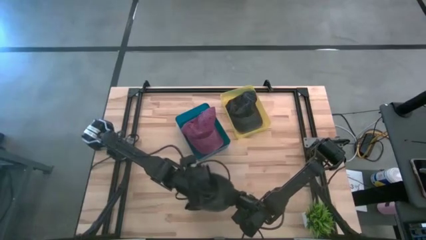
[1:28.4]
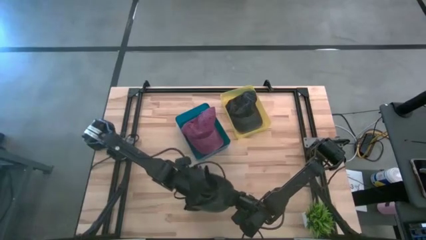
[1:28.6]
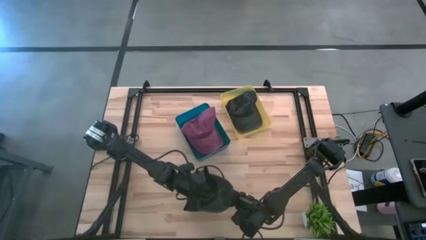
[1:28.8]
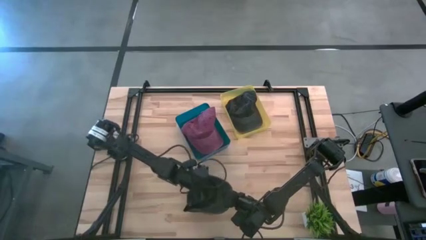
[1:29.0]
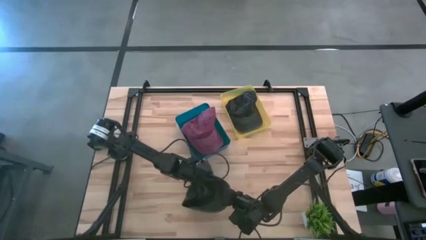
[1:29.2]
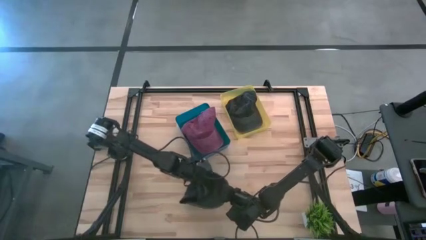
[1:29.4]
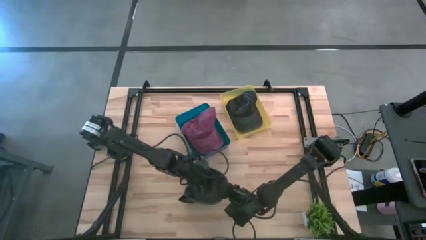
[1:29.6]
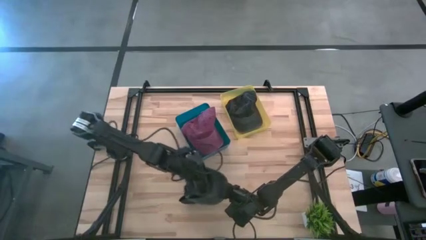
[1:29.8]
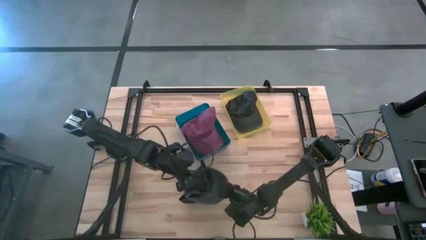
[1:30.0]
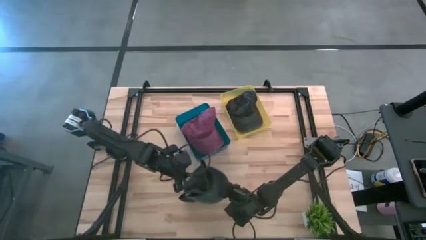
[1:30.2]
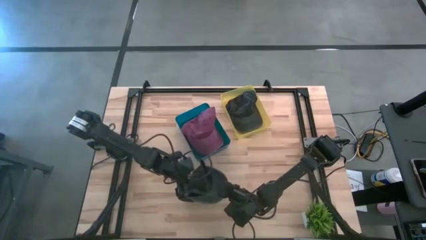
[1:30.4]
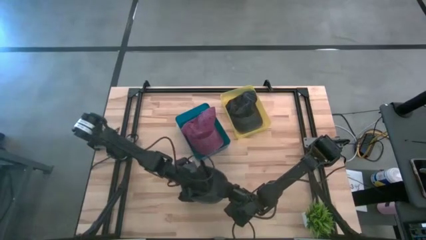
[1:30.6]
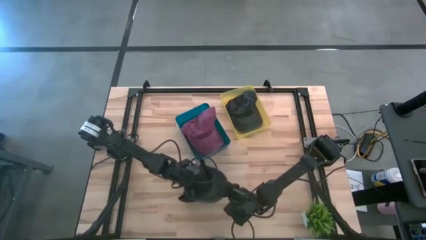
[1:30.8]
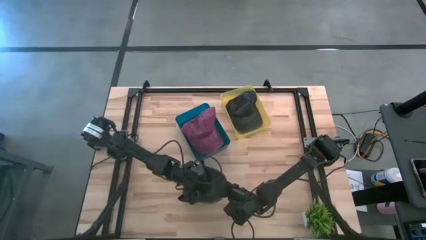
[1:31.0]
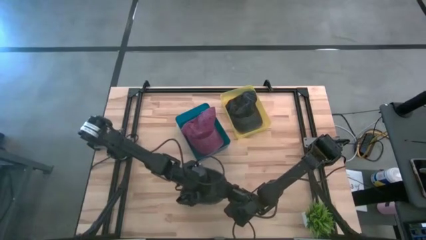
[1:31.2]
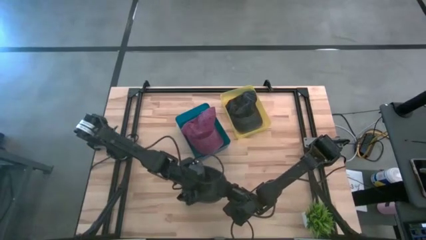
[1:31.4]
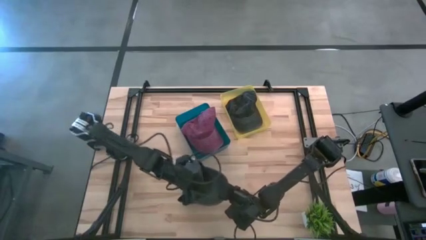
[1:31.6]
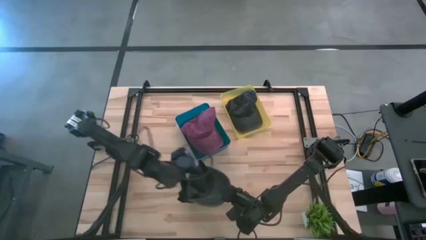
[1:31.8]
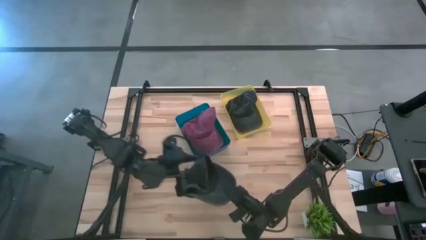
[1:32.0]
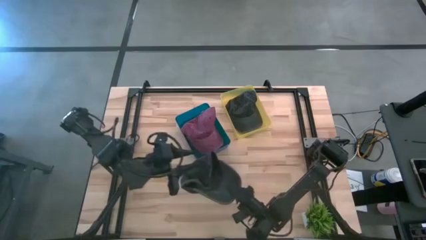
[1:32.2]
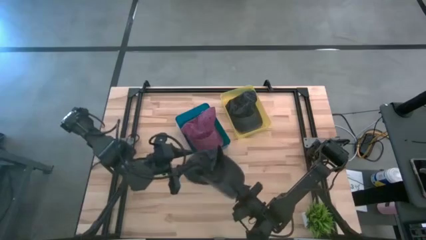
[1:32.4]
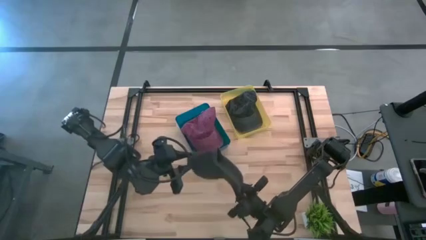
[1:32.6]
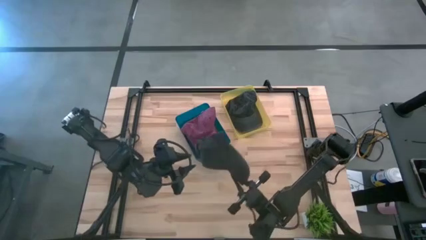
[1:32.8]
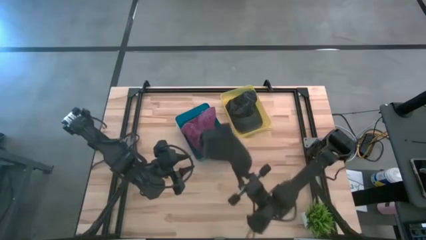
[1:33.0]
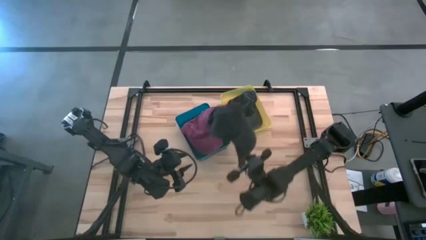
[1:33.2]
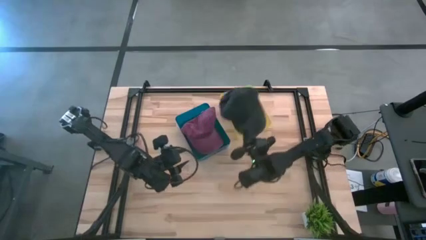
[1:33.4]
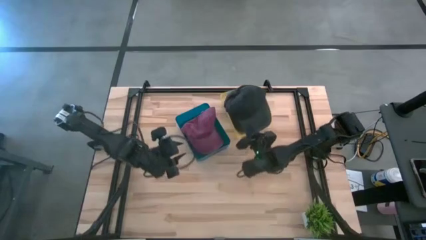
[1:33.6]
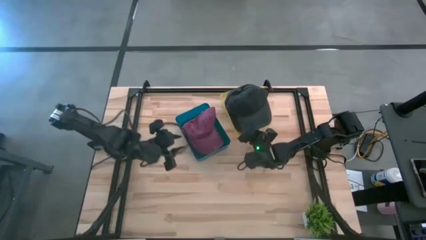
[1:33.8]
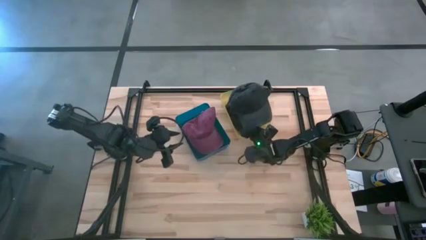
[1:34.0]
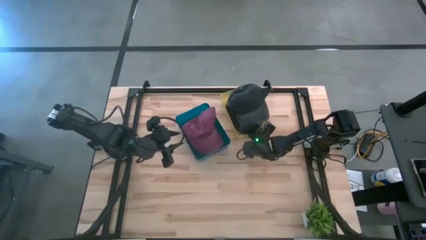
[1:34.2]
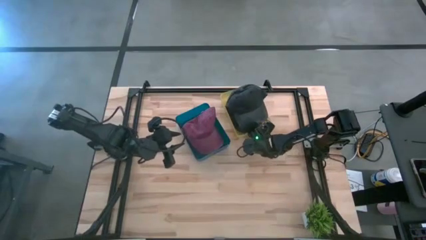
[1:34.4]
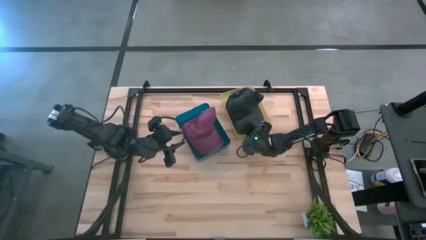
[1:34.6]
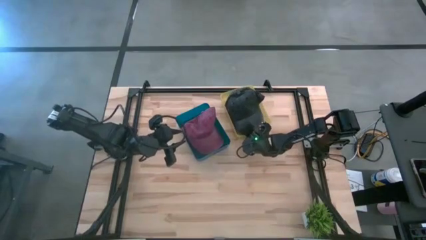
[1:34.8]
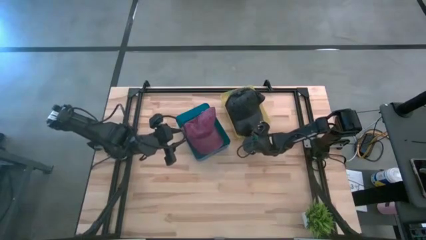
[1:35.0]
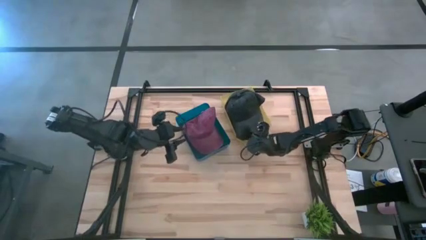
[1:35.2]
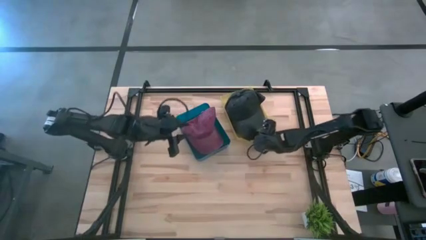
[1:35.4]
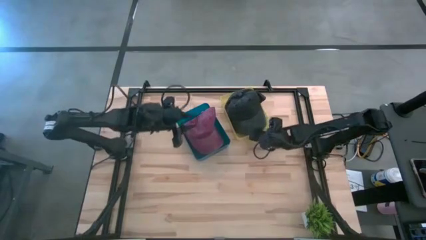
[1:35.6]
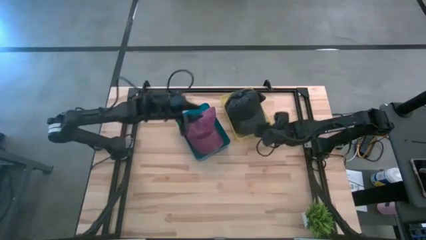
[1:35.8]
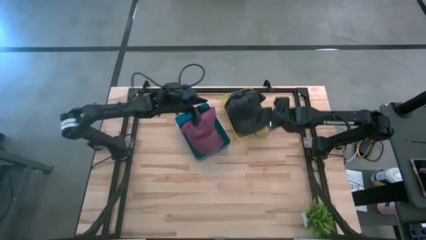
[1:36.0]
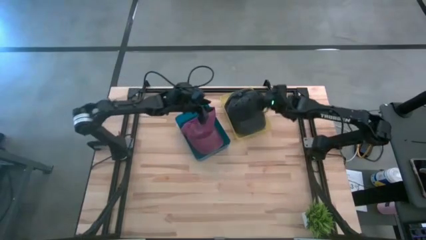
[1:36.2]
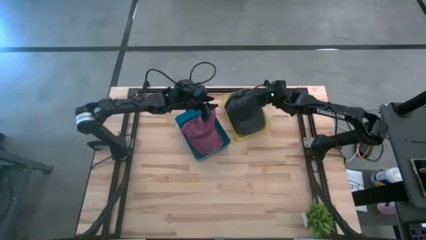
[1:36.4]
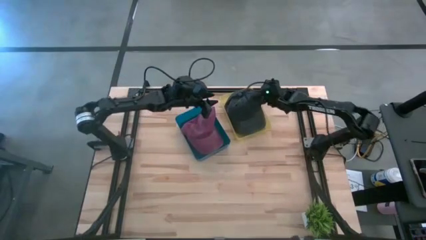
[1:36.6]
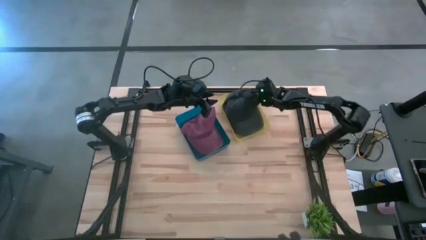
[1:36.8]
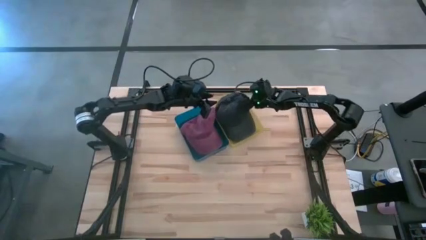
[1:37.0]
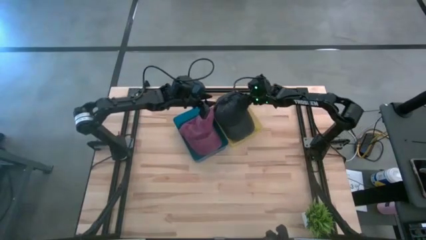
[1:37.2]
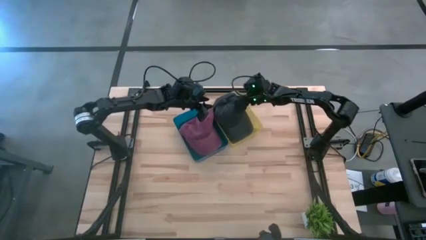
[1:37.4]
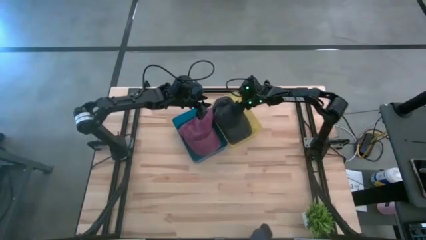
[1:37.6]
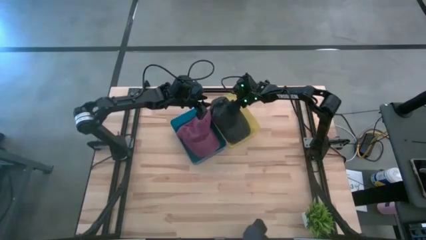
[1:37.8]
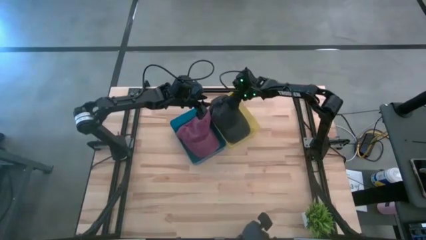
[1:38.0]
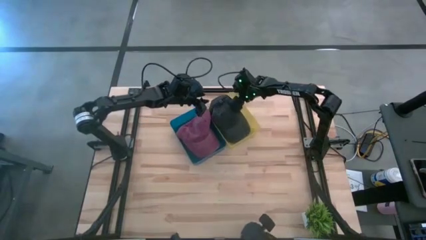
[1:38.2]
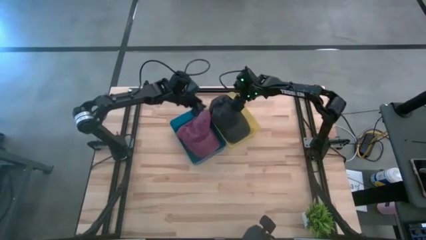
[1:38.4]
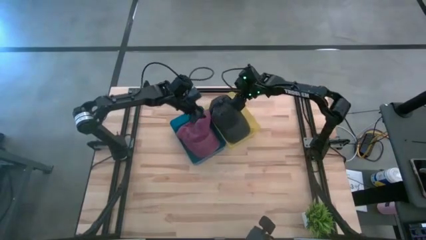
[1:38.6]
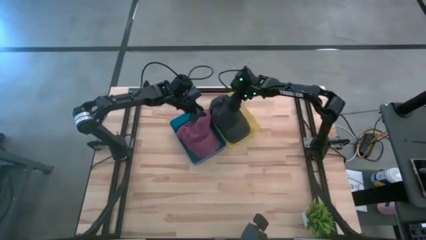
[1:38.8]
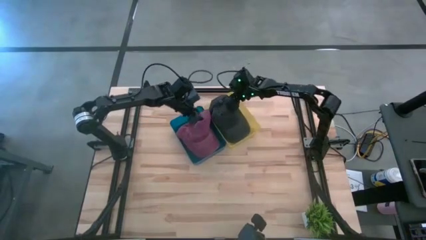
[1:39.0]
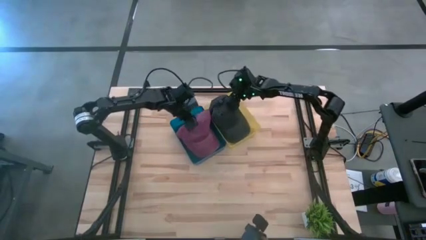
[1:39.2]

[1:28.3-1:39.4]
Task: Pick & Place hat
Put the black cap into the yellow bin

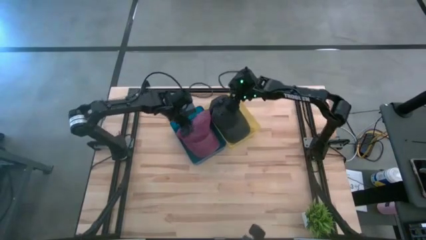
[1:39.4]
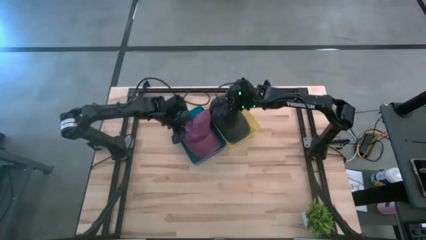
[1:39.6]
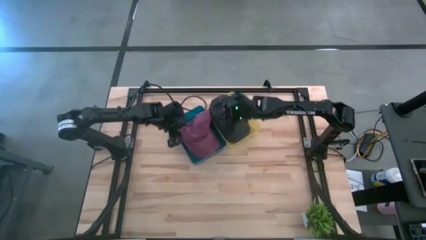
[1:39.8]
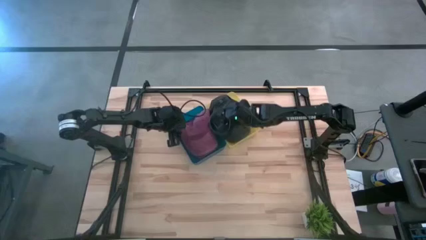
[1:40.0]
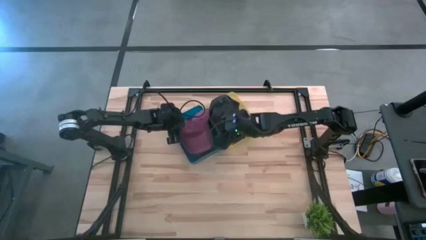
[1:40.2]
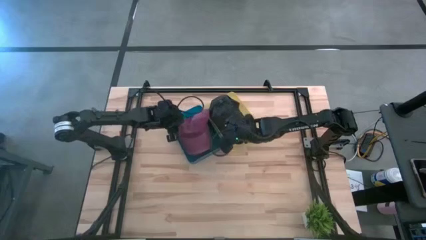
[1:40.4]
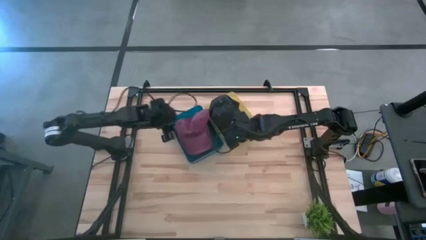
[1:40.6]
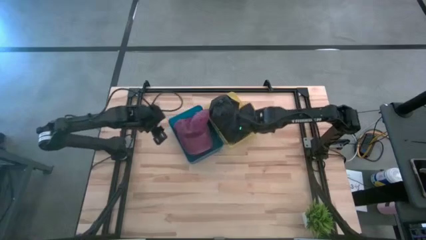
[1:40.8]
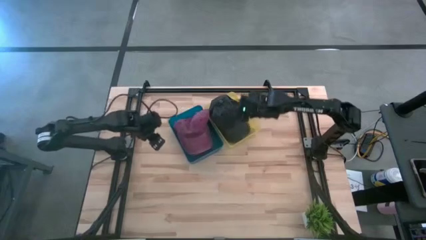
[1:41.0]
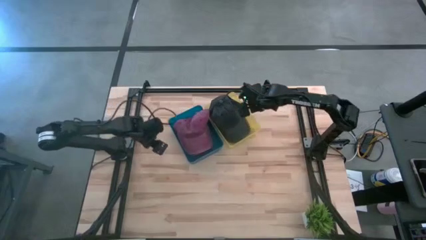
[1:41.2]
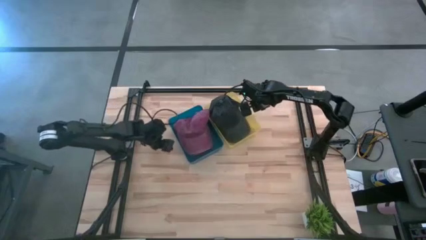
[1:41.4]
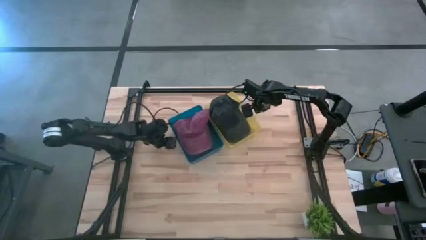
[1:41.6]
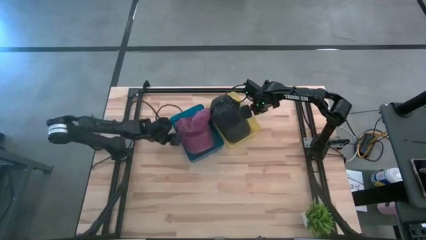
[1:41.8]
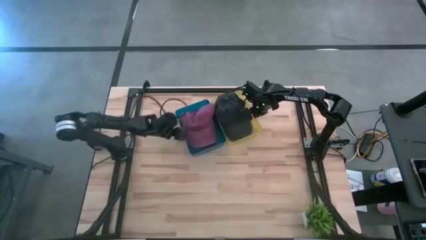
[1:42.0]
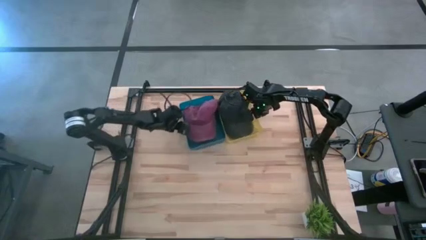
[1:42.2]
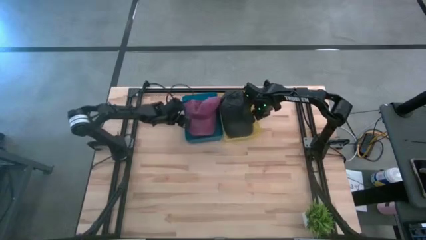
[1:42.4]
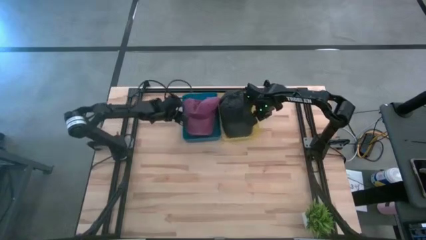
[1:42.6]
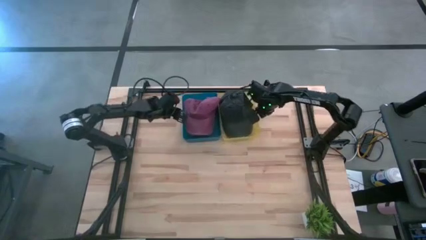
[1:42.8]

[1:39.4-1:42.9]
Adjust the bins on the table

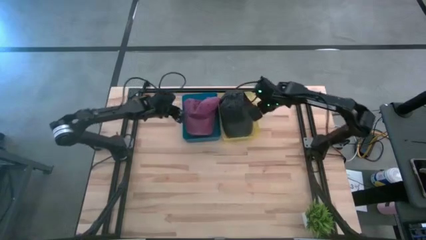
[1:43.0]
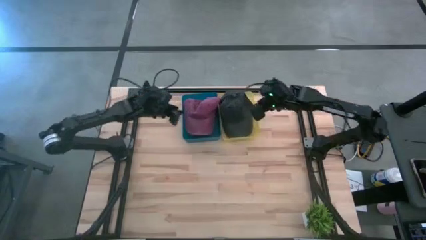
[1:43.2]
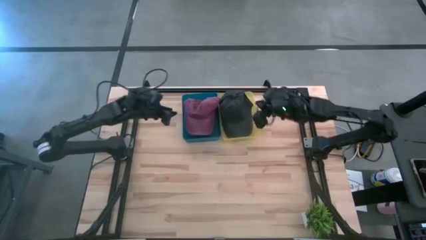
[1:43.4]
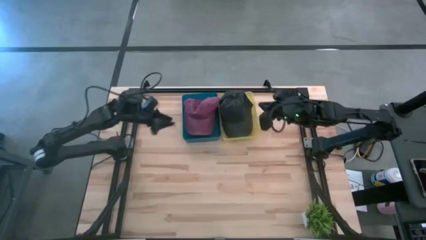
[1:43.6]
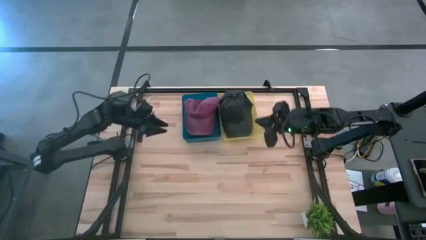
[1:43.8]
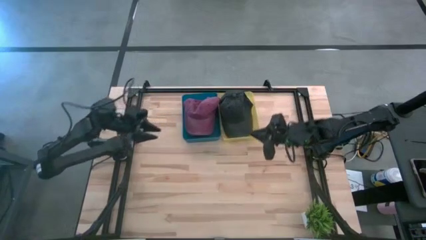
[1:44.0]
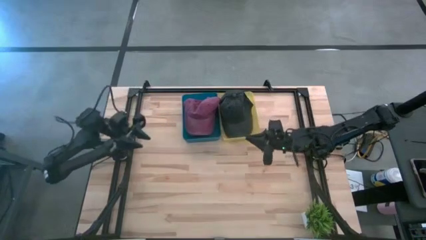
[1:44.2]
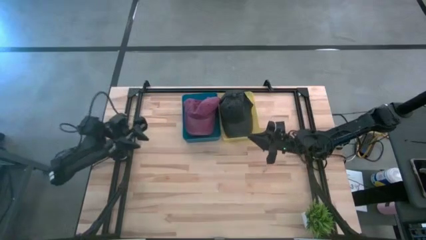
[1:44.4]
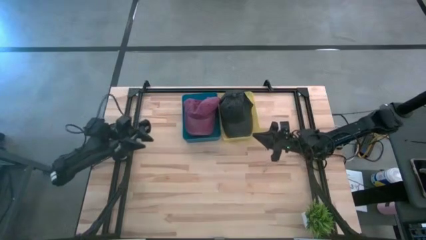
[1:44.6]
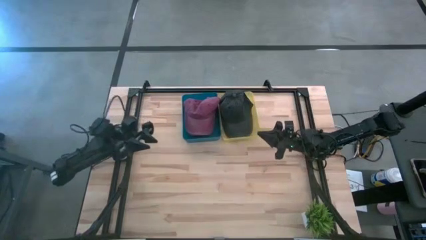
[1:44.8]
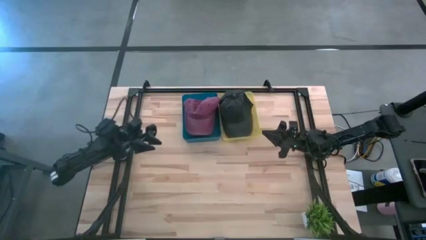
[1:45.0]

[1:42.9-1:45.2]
Return to Home Position
